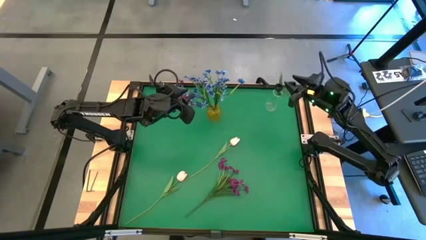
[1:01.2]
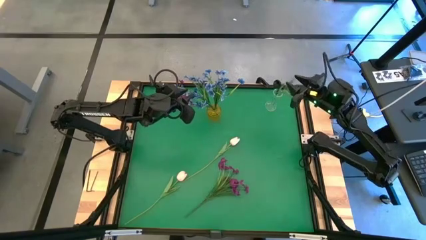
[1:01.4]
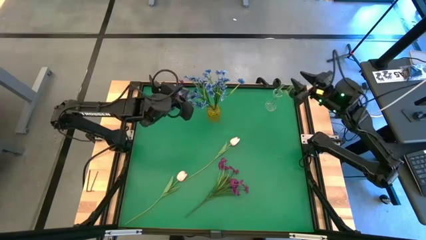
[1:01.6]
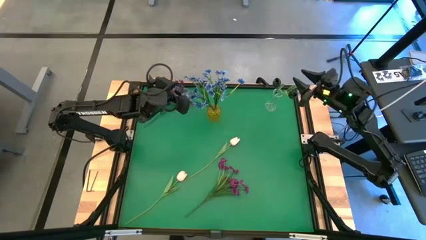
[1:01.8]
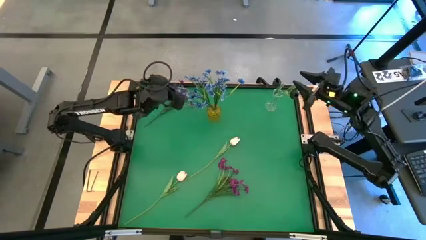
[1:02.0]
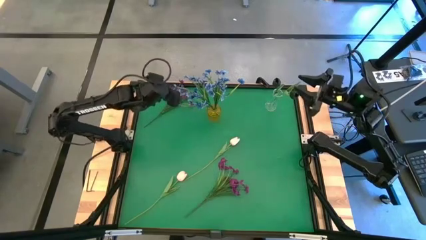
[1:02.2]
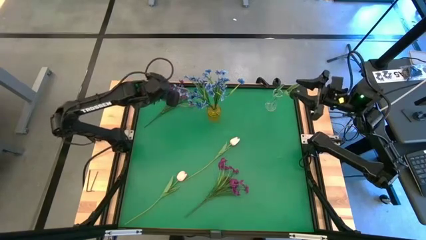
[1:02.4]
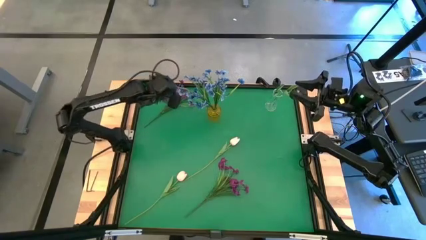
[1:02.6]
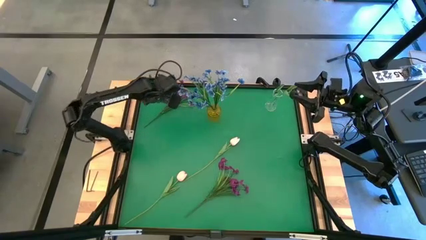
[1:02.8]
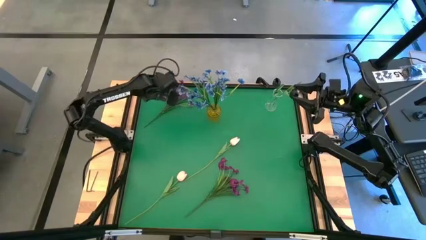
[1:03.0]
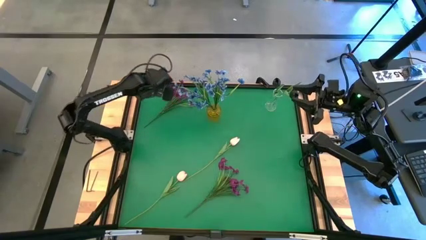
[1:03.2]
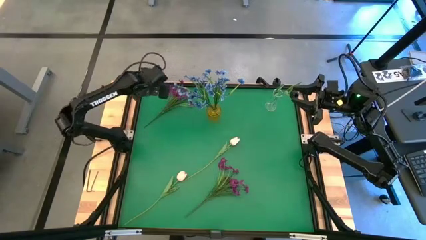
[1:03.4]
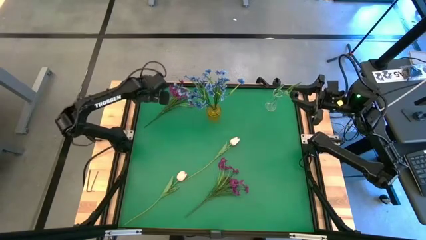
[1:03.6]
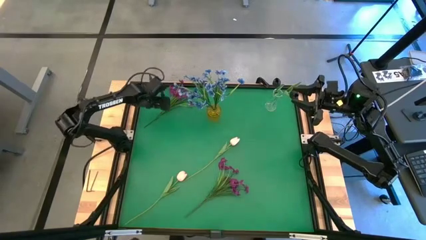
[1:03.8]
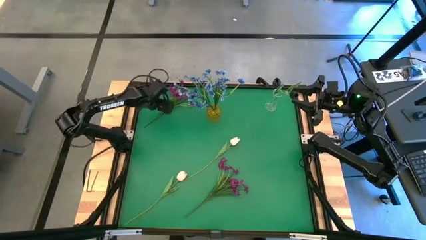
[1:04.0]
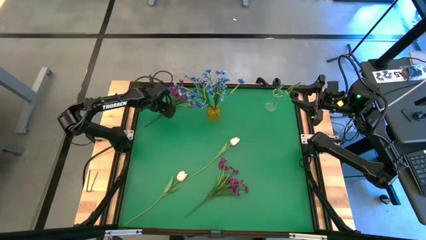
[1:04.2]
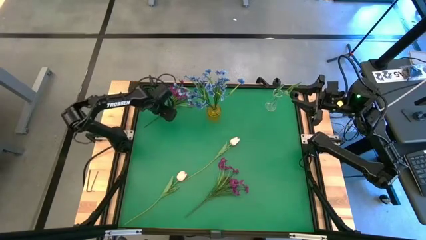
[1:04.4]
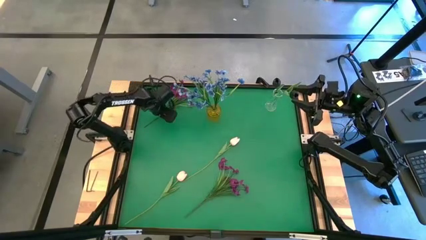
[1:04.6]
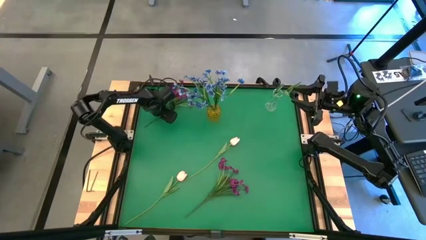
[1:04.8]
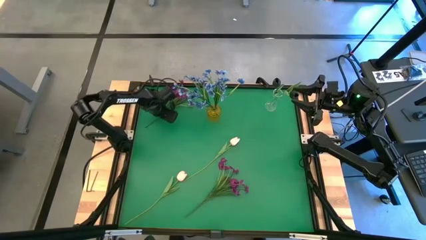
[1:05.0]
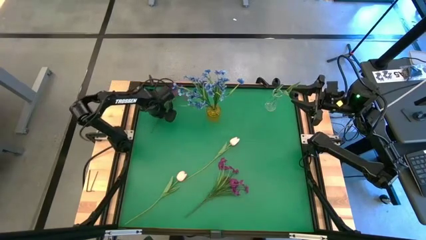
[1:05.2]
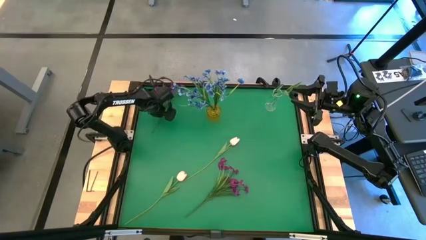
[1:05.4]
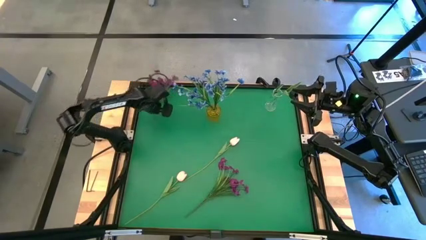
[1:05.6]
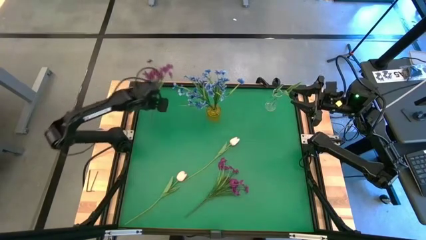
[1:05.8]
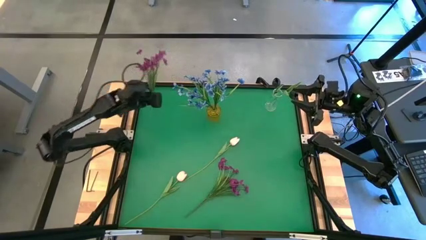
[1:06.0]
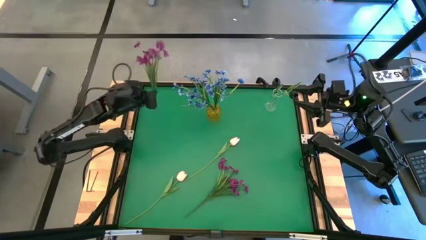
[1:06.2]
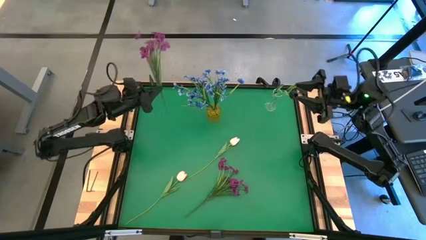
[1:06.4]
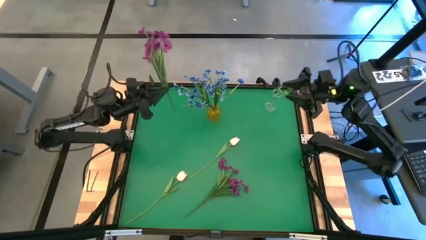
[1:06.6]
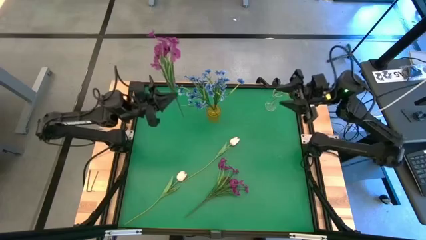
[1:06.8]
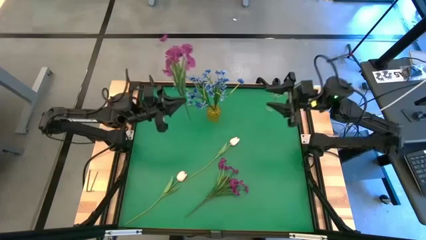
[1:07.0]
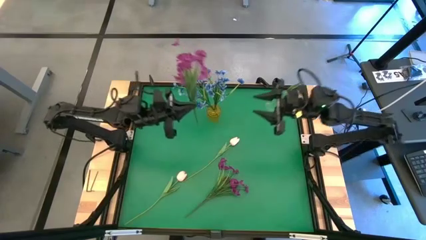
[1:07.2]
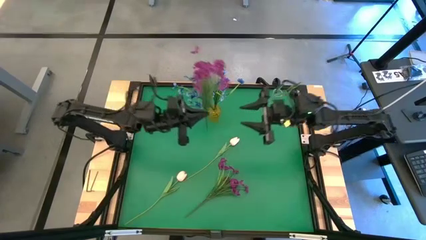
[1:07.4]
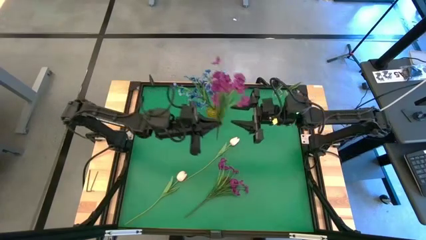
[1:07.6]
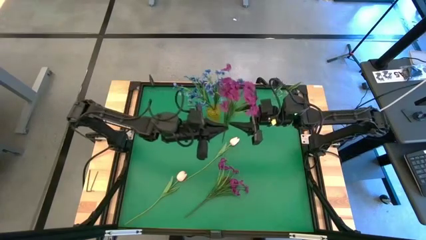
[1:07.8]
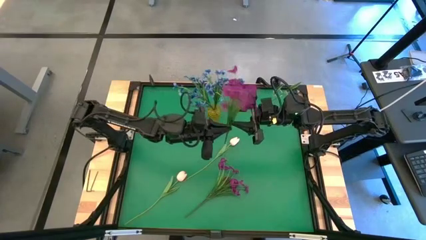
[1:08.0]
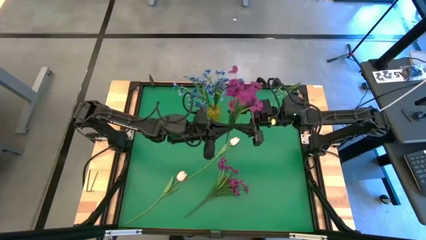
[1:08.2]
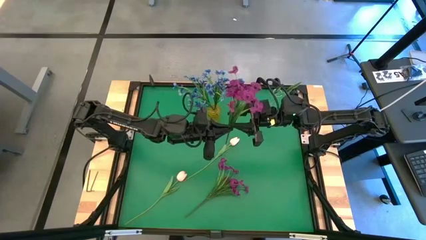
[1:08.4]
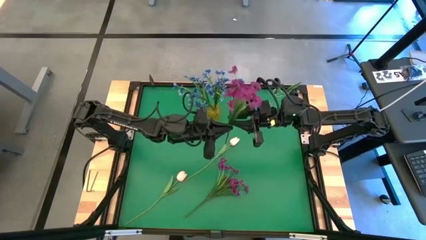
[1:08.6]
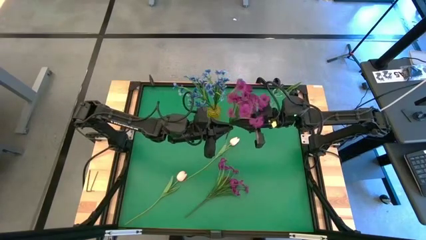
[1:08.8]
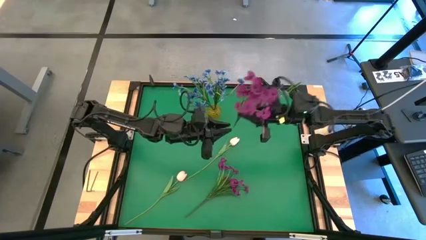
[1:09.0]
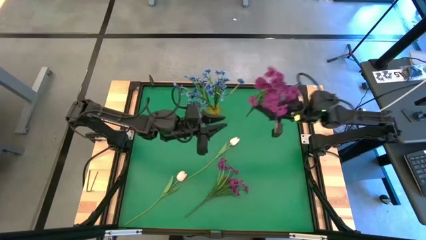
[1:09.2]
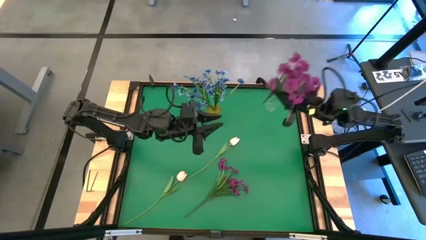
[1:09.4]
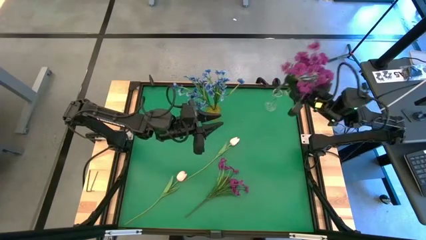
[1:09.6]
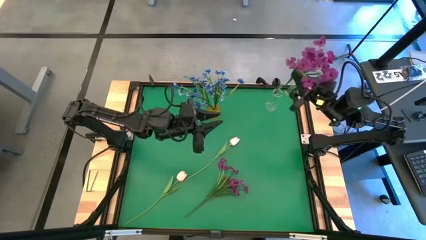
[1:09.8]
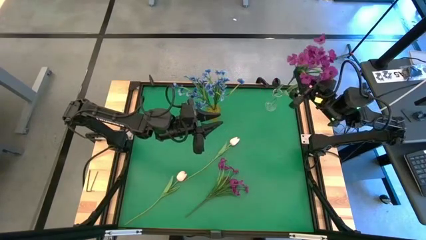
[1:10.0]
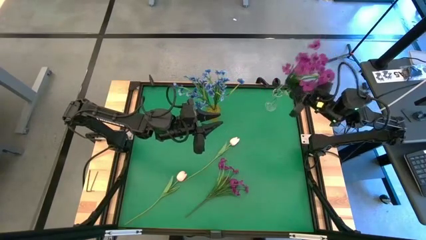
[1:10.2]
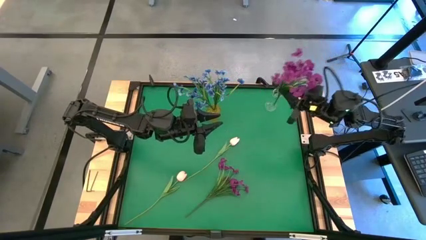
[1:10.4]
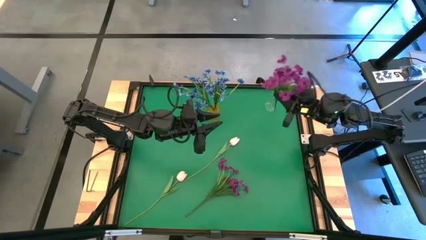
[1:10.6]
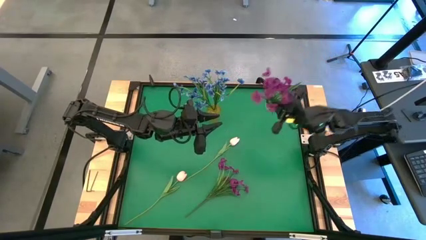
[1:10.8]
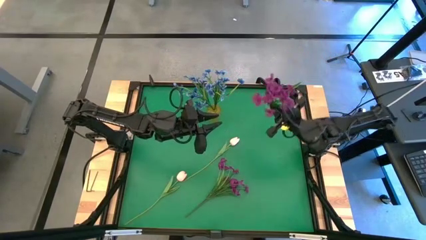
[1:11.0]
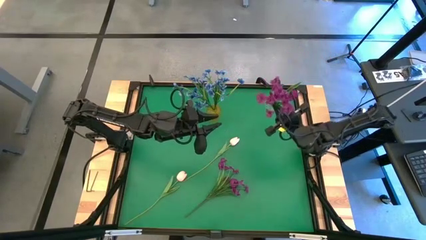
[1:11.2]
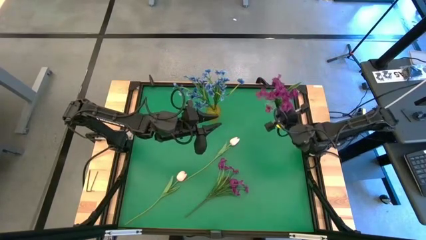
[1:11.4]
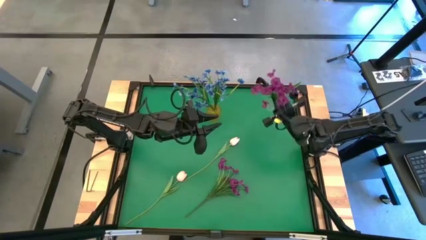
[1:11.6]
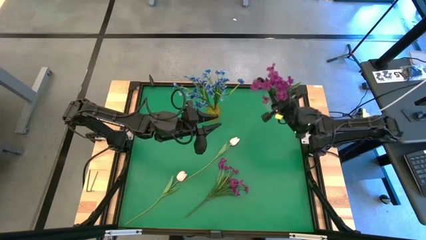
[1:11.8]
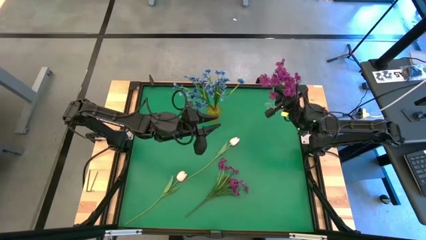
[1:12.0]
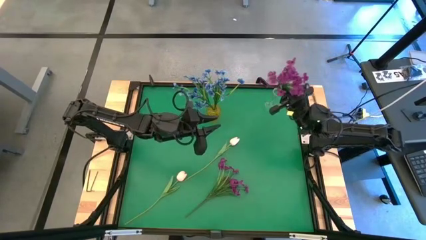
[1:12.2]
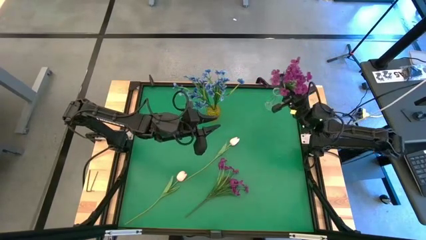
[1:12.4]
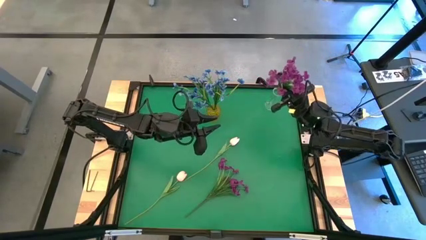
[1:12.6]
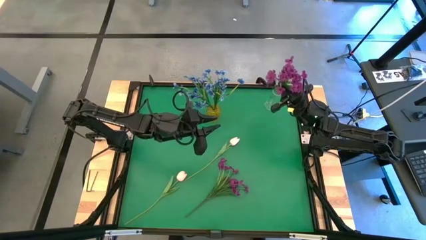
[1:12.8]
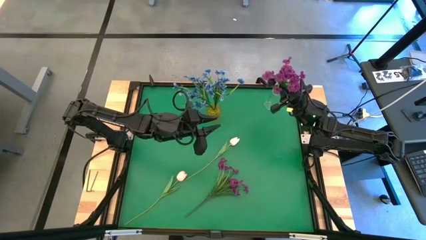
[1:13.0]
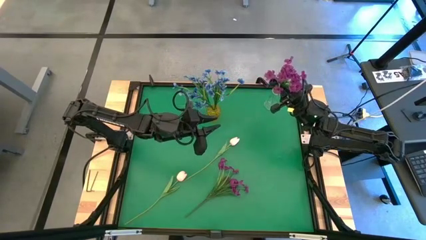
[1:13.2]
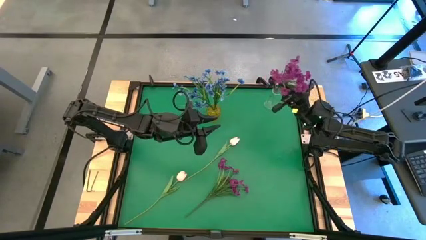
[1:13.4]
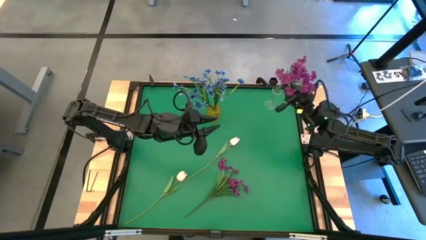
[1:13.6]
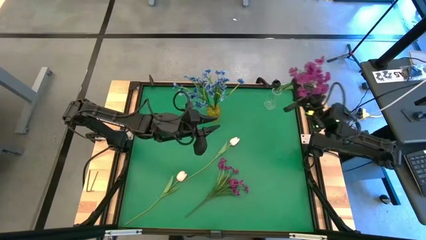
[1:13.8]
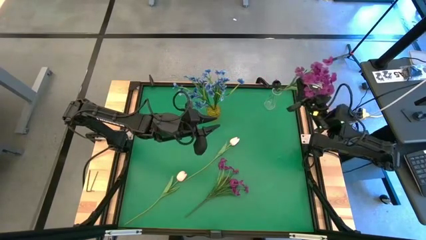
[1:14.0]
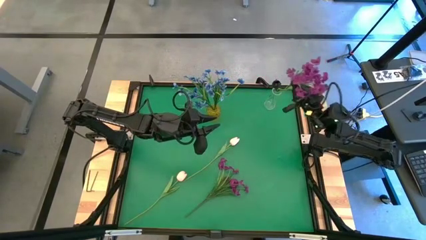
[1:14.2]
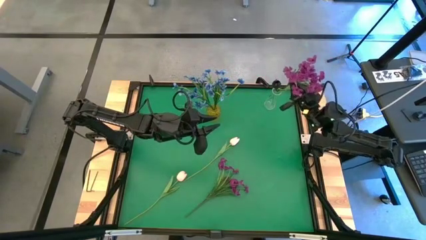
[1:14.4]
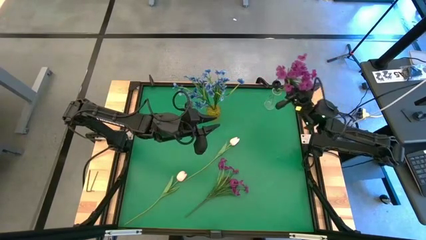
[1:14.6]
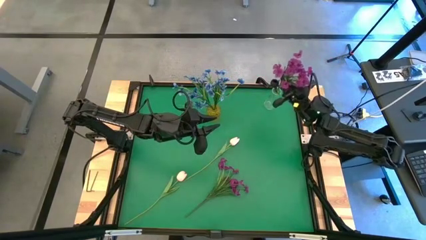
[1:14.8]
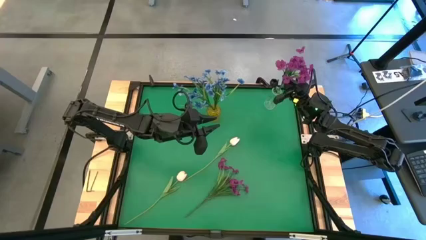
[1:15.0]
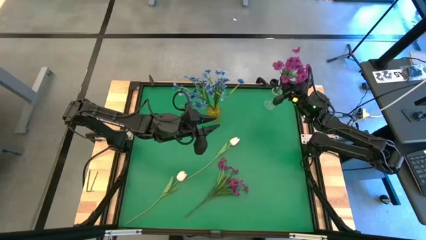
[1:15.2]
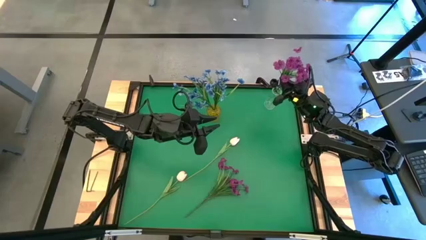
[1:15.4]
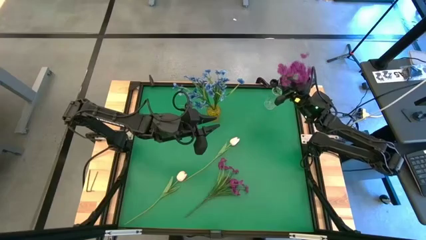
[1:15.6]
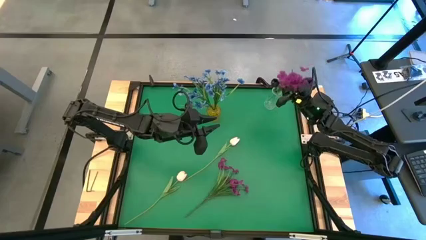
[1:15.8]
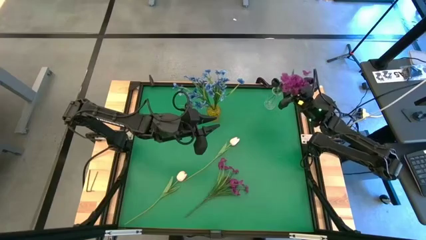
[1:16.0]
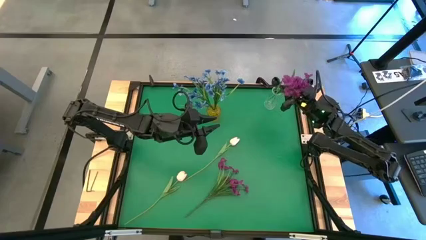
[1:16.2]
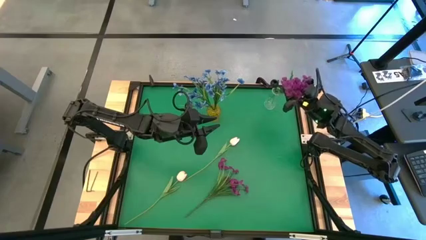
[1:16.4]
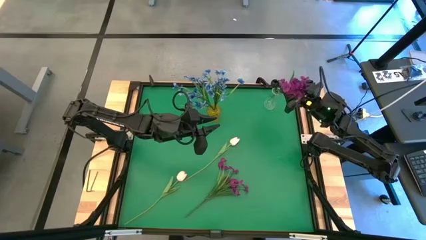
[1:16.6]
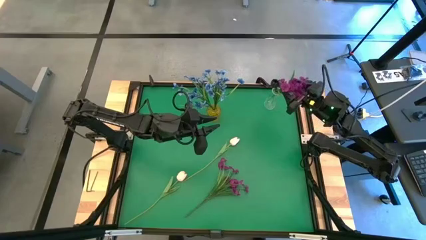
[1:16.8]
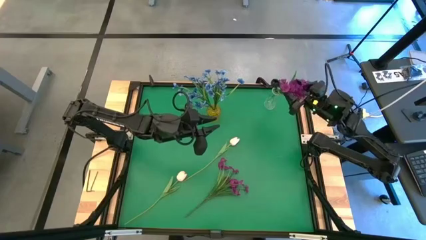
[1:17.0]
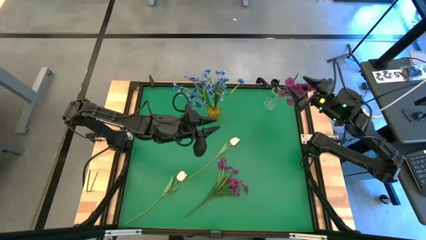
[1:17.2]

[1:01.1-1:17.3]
Task: Sort flowers into vase by color
Put the top violet flowers into the transparent vase
